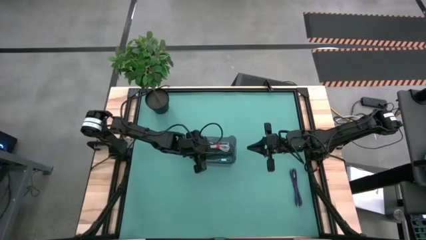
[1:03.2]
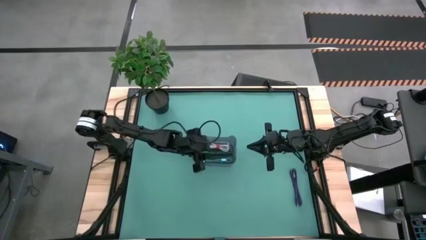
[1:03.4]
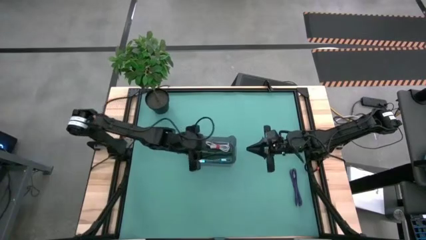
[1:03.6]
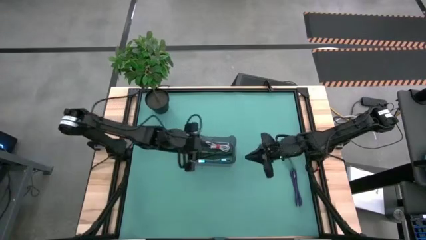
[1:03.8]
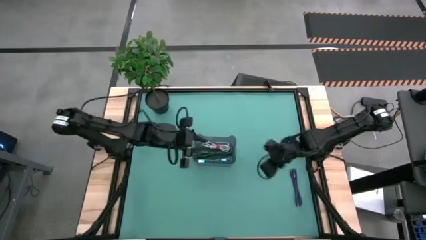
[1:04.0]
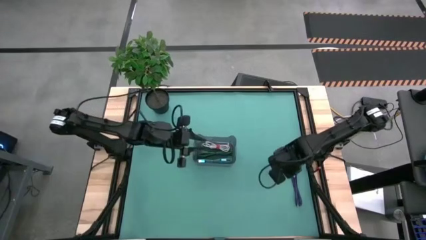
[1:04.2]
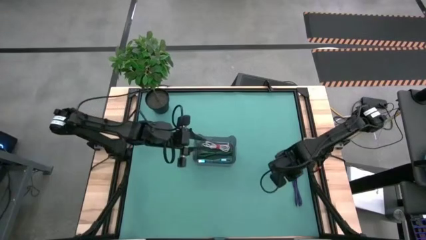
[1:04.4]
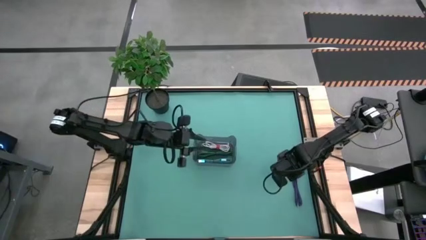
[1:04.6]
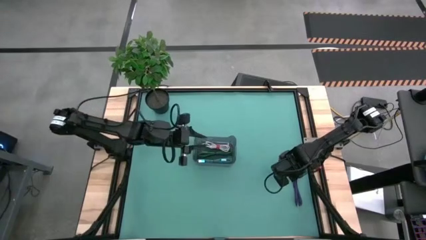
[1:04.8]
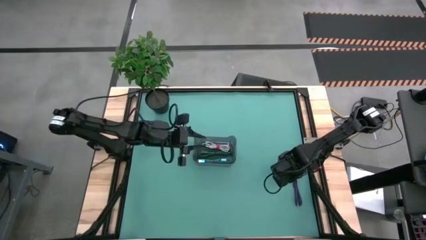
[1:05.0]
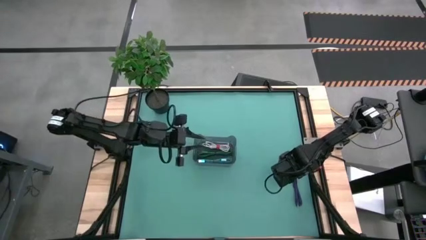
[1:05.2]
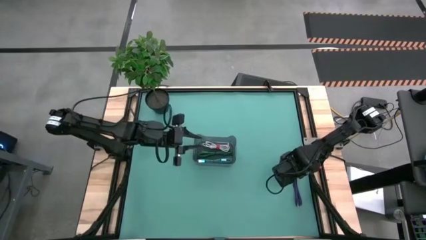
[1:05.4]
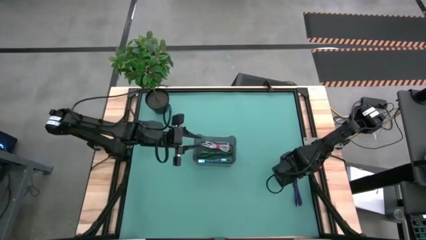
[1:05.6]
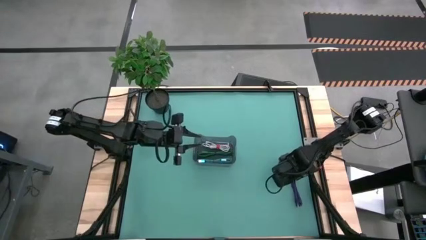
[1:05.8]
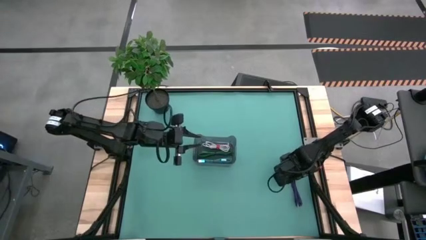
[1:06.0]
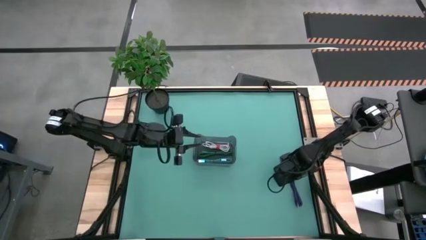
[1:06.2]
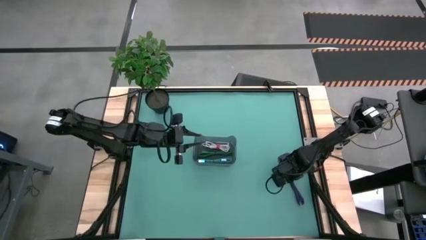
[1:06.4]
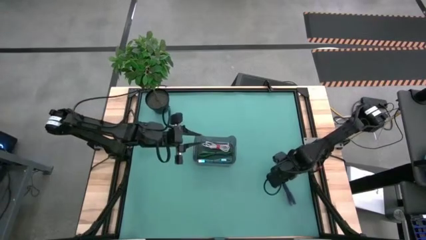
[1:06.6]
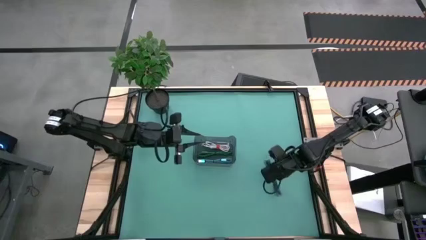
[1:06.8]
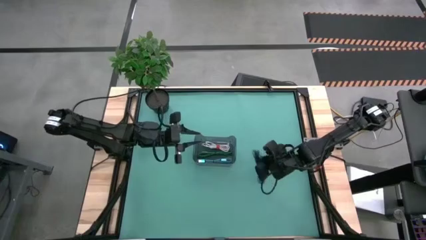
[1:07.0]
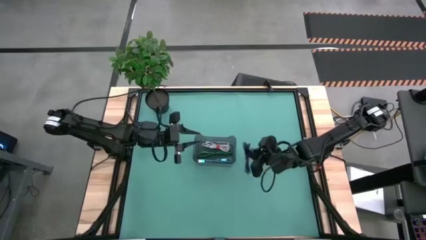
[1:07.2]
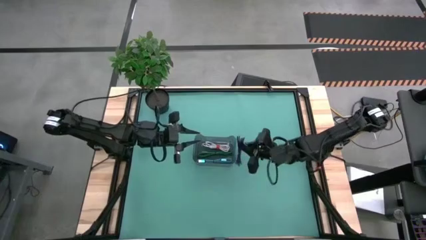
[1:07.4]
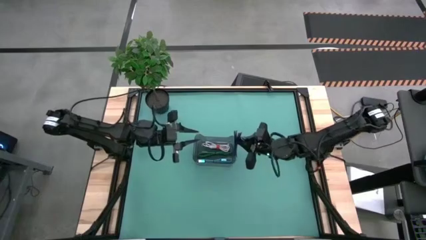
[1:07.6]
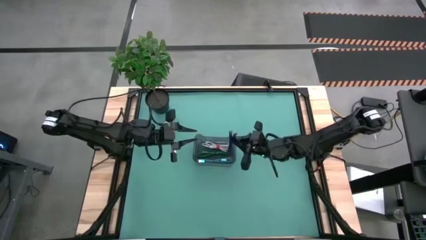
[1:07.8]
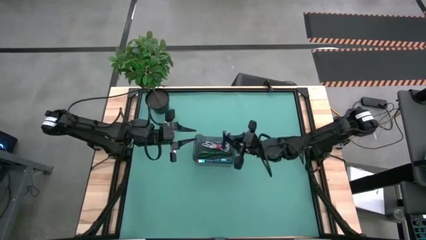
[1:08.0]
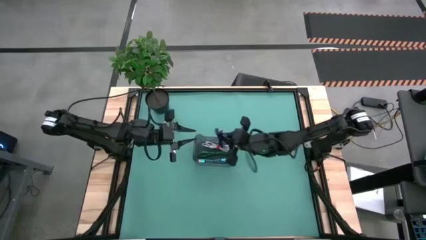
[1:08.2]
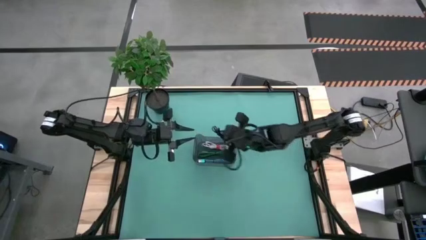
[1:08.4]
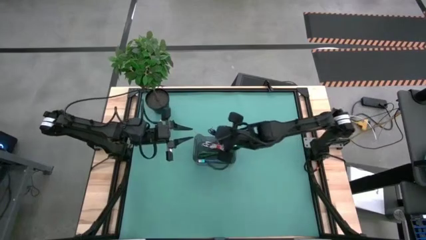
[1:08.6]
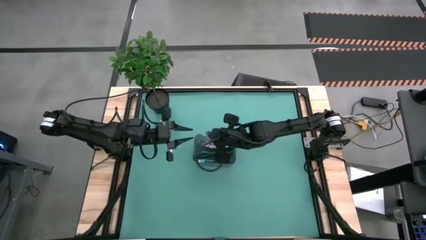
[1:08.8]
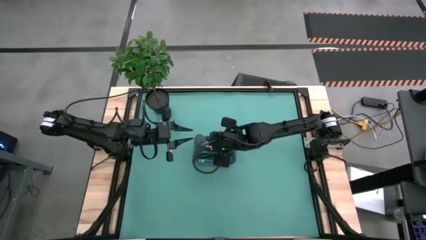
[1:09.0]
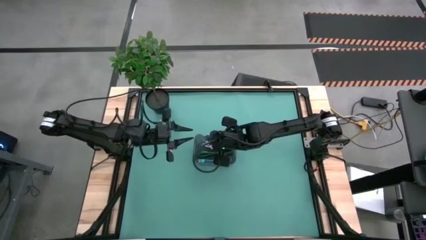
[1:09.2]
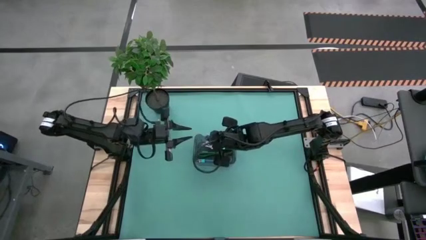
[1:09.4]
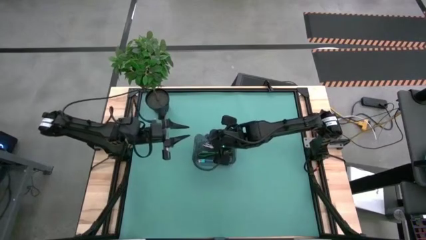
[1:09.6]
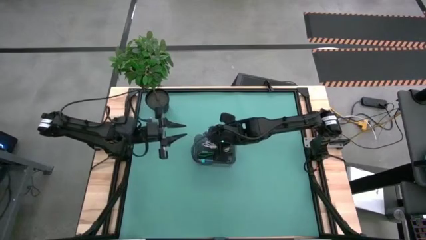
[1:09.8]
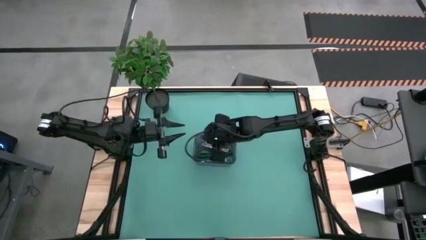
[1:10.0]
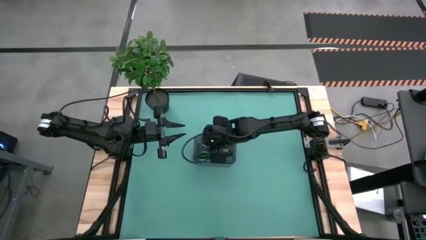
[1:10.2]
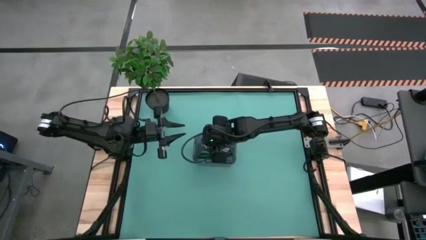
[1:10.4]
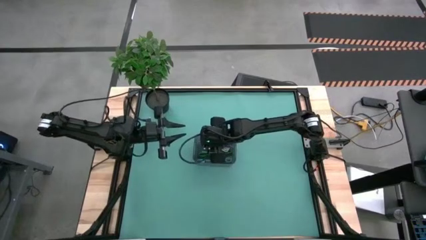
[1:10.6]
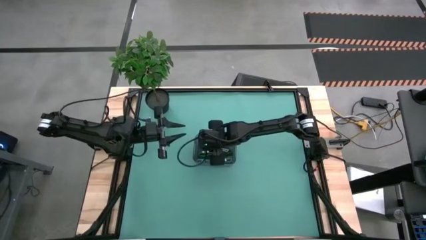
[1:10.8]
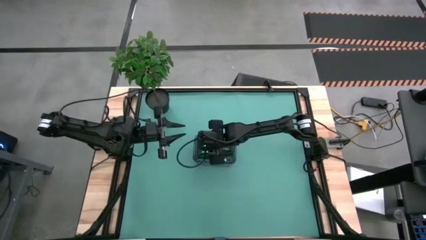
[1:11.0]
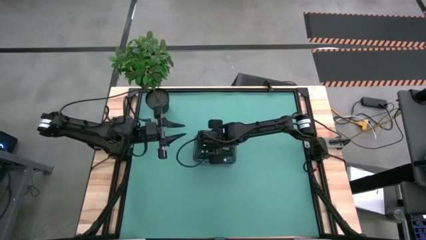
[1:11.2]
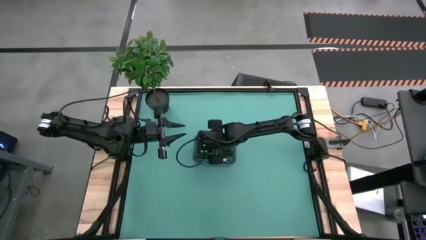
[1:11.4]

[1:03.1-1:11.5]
Task: Pick and place USB-C Cables
Put the purple cable into the black transparent container

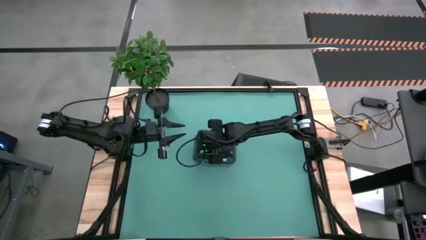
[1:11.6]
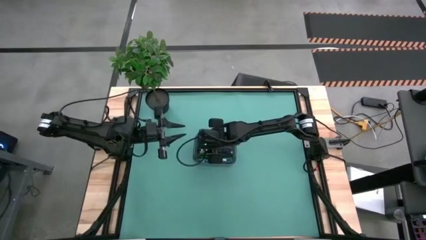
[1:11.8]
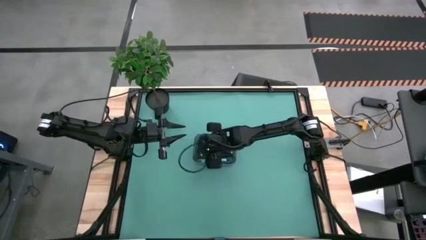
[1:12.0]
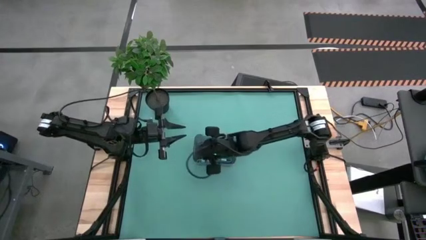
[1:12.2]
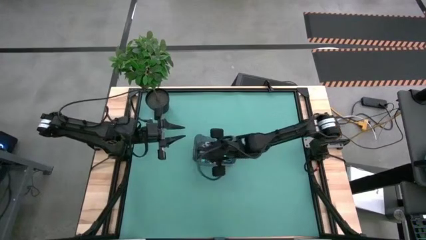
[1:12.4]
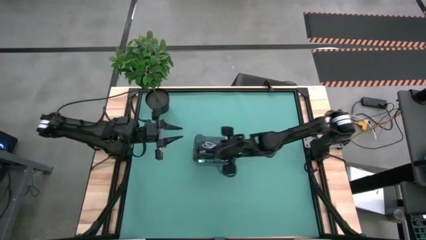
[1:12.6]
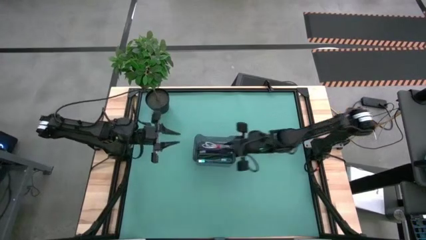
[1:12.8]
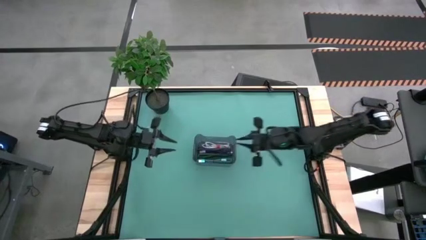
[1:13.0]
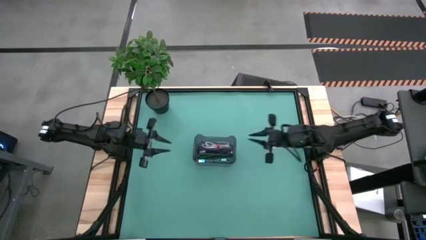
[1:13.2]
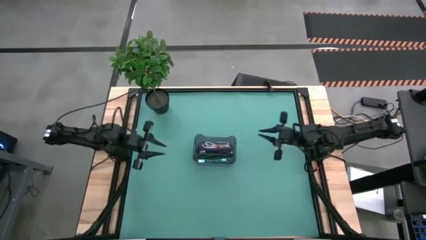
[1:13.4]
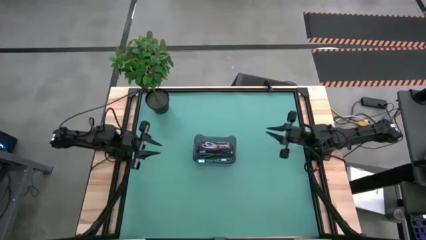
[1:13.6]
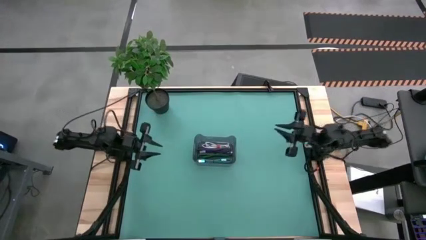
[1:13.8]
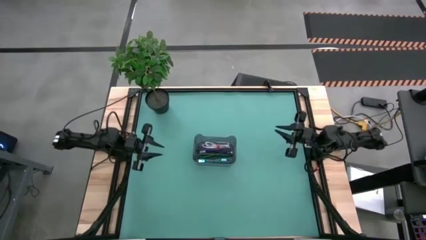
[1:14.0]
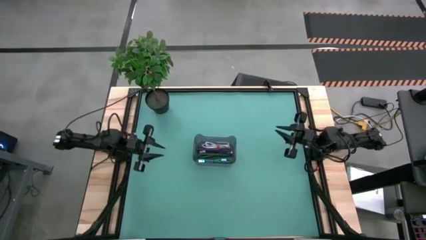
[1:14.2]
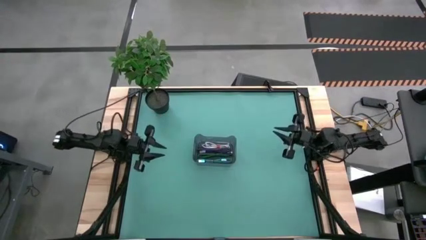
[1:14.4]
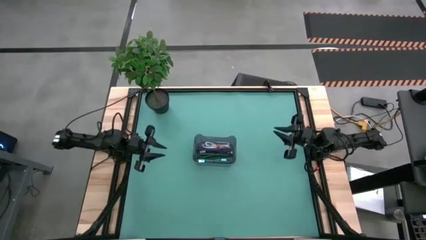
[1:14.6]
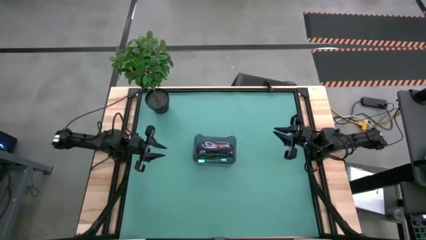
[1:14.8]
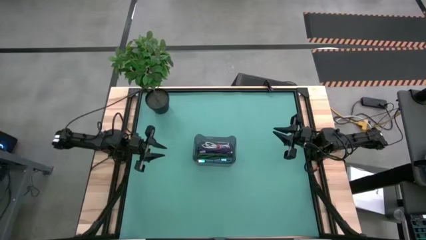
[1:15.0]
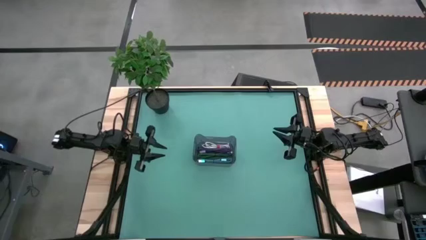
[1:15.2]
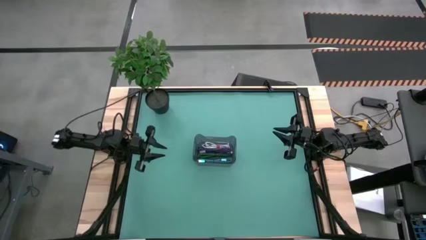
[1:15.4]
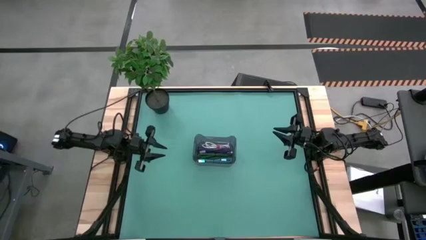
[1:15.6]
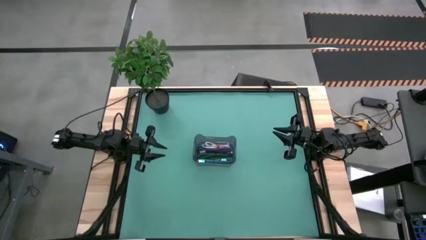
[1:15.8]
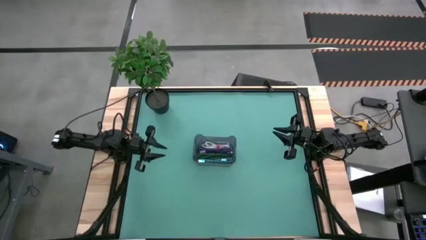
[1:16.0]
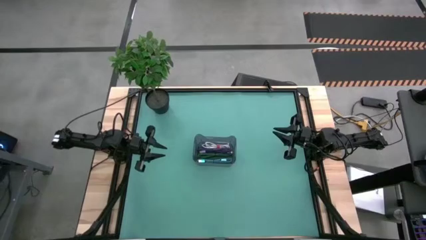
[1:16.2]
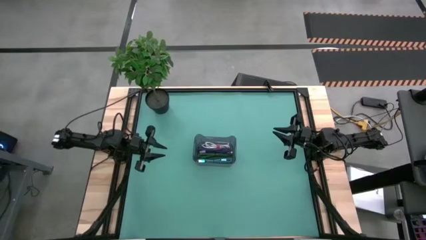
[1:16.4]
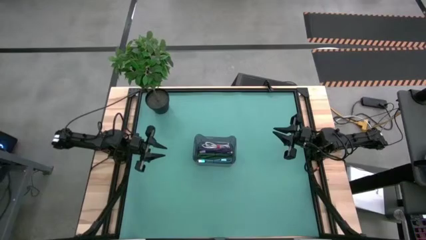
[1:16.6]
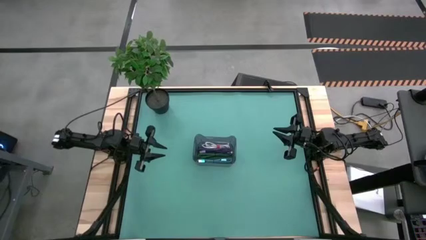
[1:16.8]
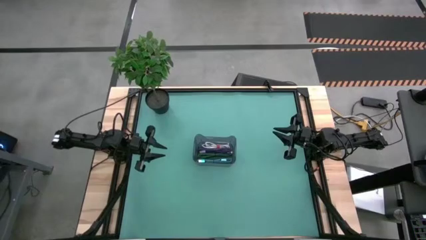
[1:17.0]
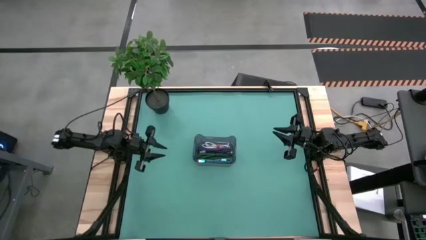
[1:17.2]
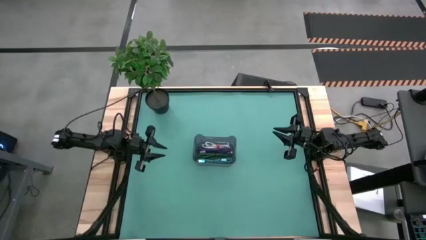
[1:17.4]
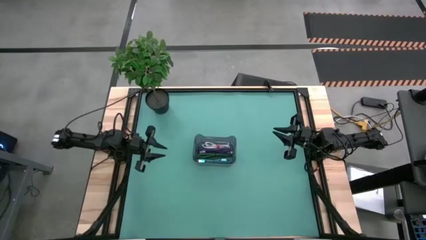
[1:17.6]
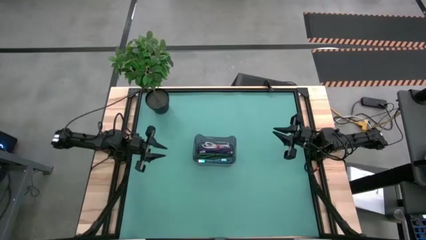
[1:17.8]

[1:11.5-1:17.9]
Return to Home Position
